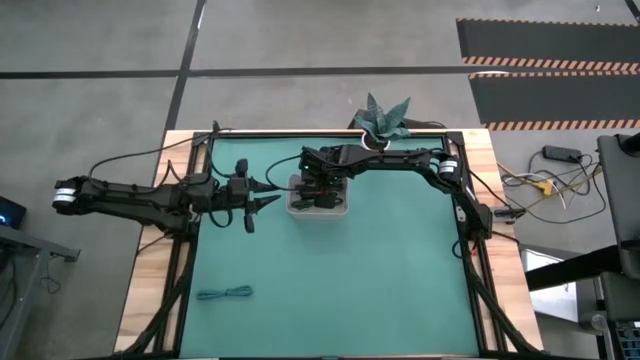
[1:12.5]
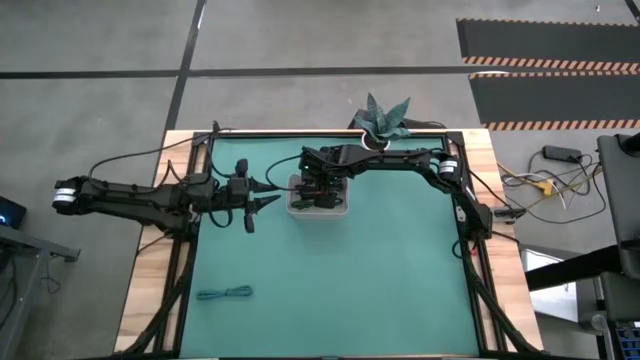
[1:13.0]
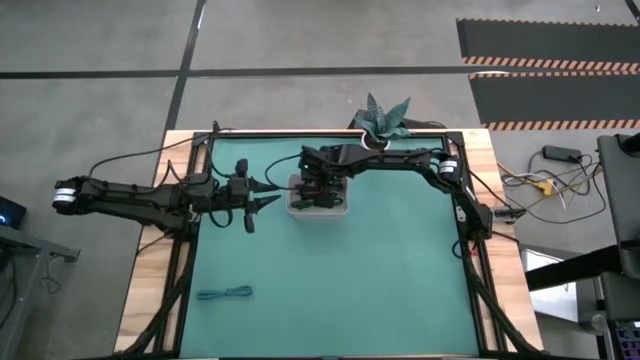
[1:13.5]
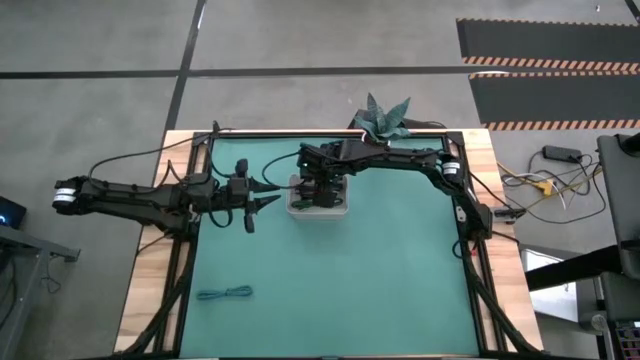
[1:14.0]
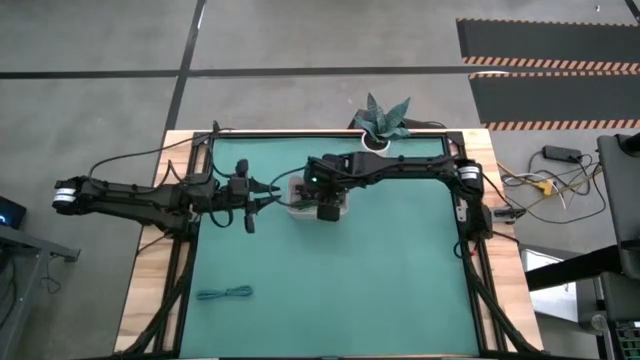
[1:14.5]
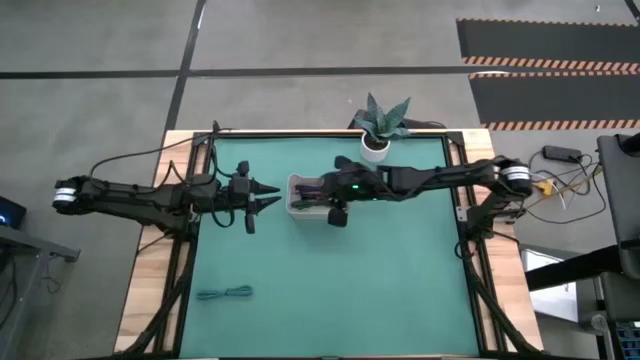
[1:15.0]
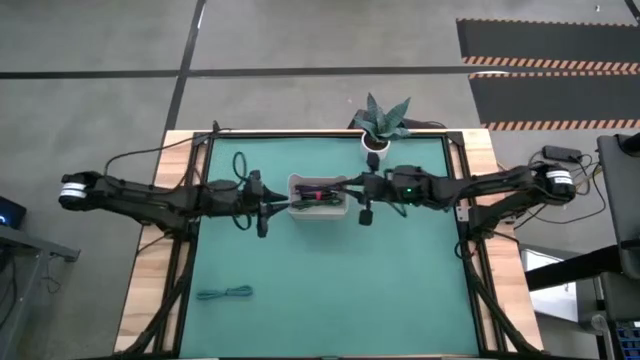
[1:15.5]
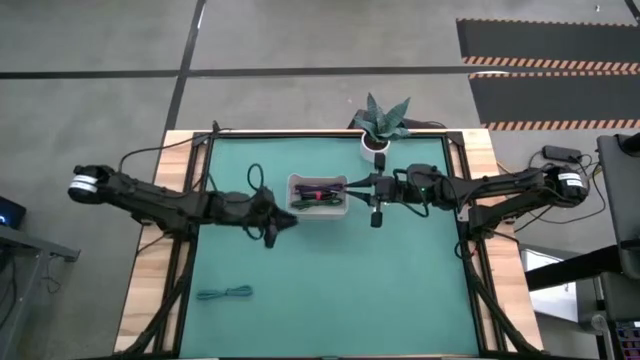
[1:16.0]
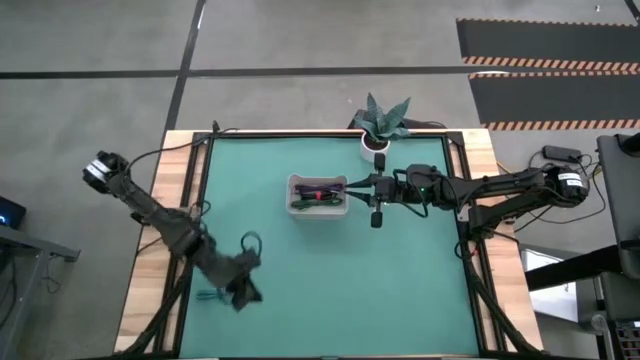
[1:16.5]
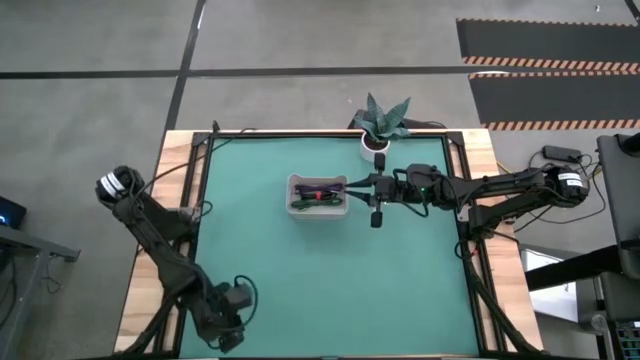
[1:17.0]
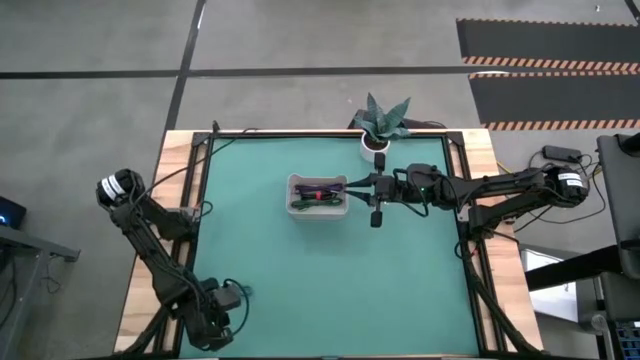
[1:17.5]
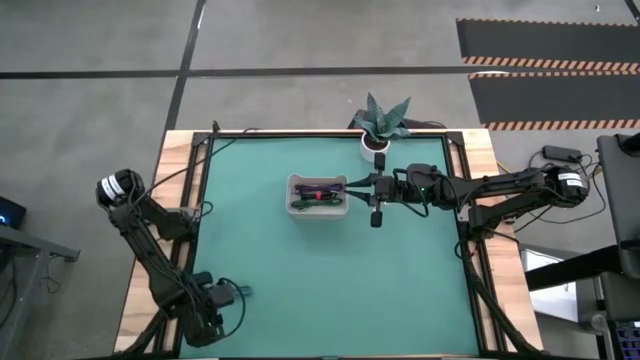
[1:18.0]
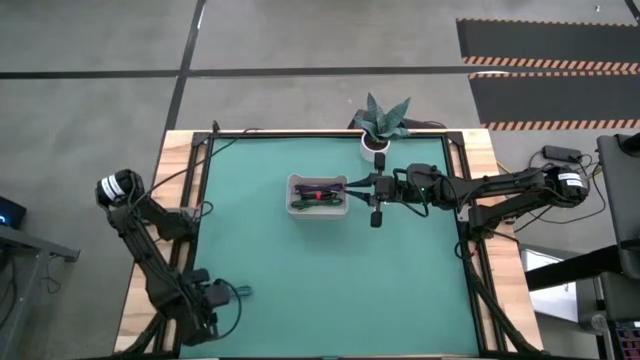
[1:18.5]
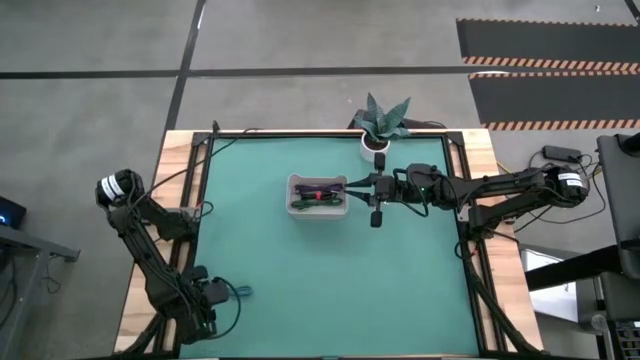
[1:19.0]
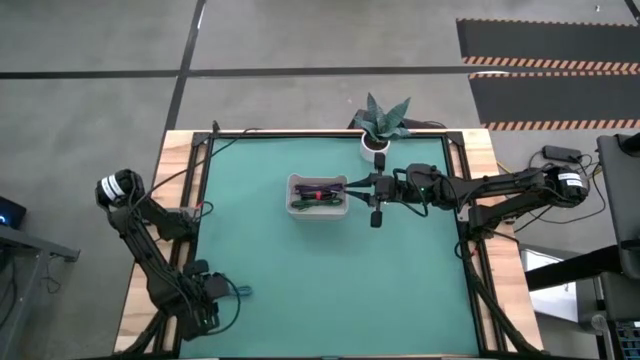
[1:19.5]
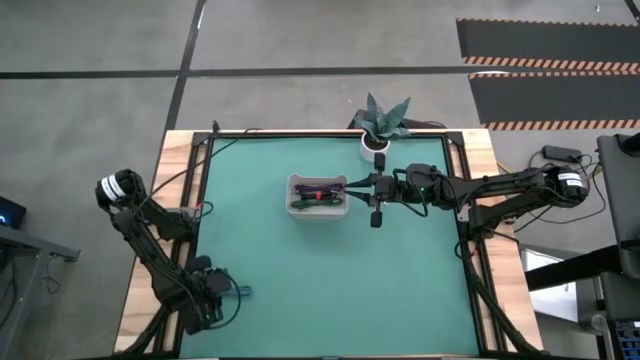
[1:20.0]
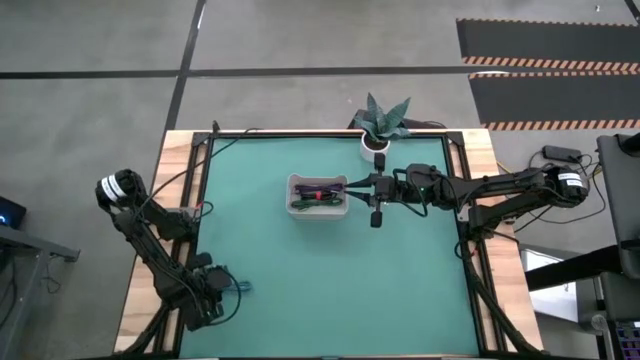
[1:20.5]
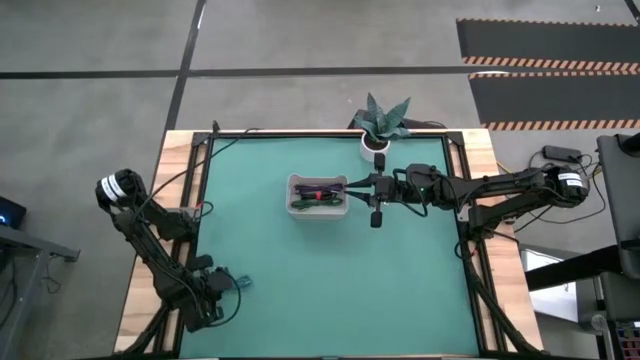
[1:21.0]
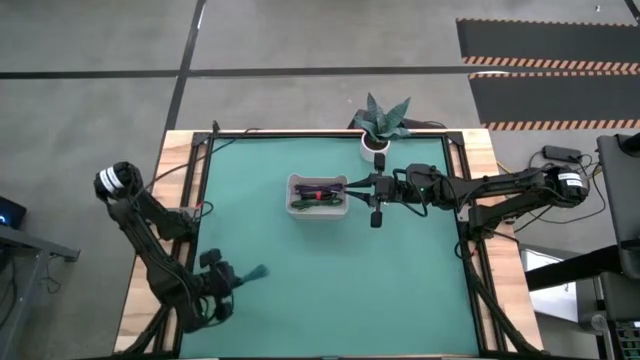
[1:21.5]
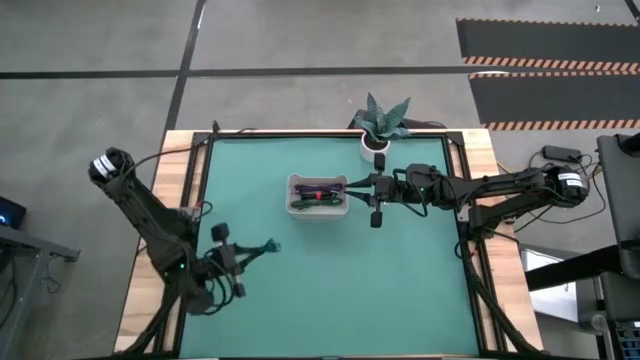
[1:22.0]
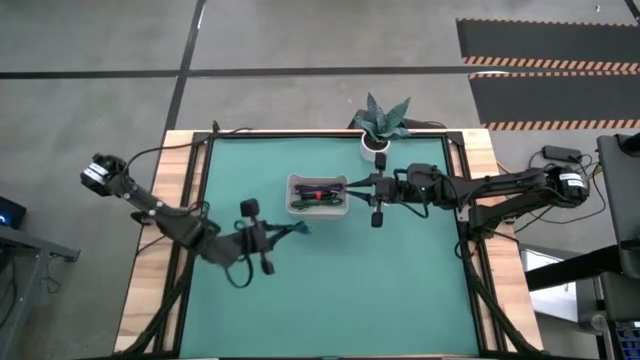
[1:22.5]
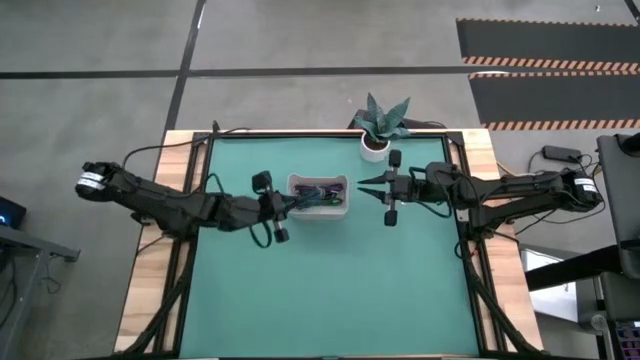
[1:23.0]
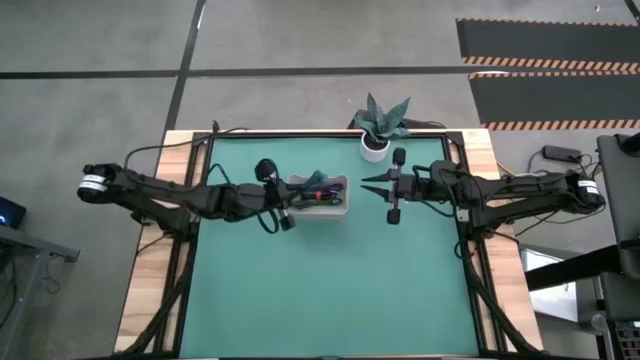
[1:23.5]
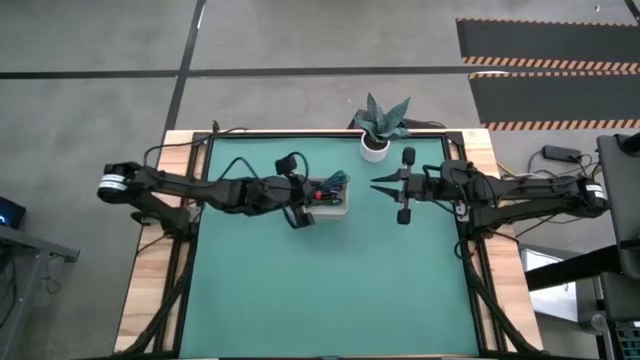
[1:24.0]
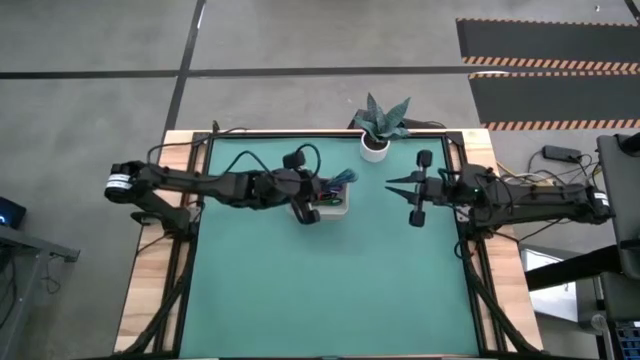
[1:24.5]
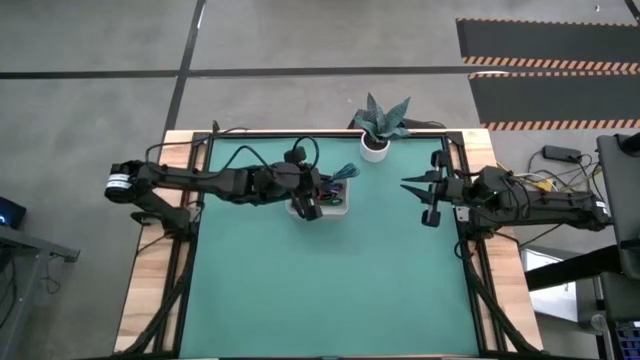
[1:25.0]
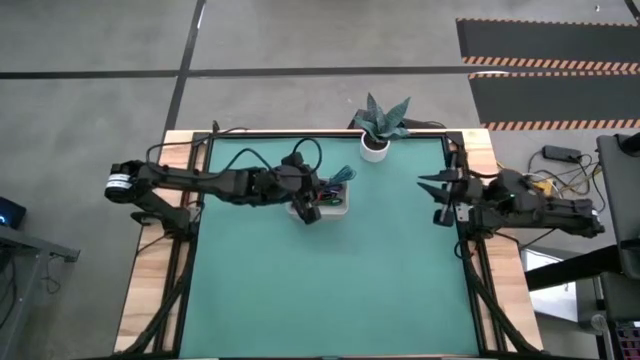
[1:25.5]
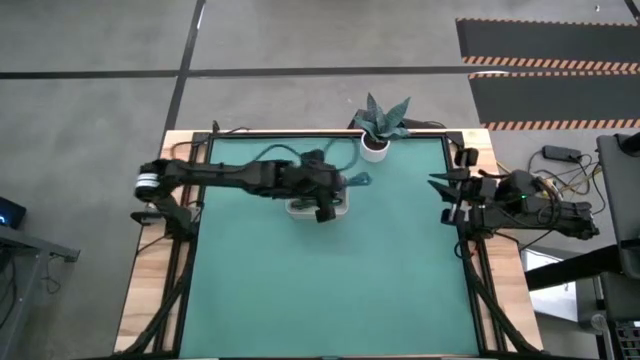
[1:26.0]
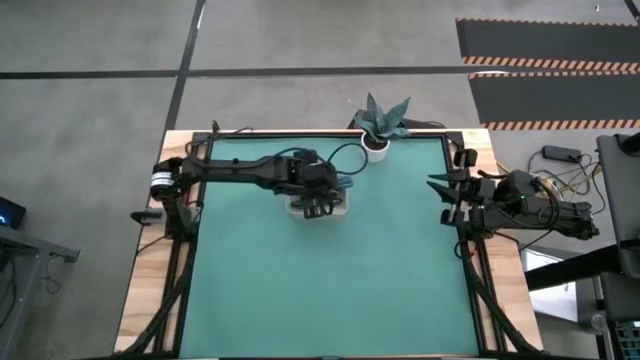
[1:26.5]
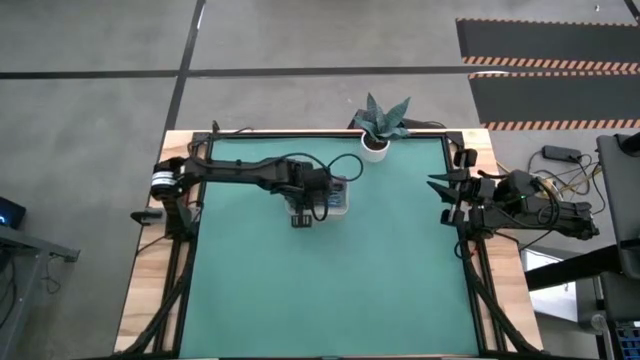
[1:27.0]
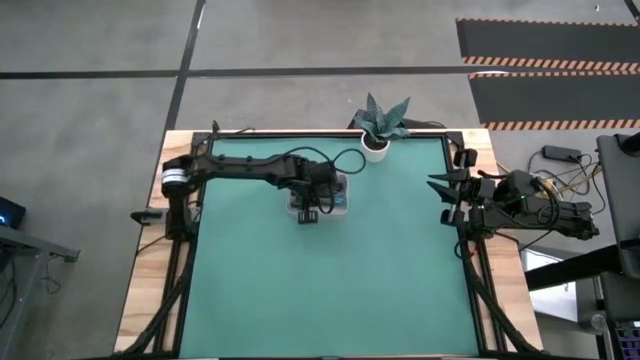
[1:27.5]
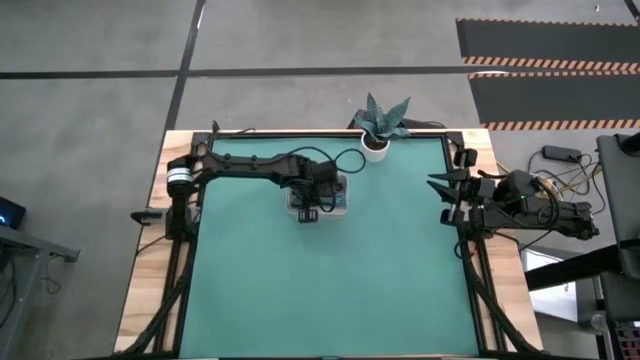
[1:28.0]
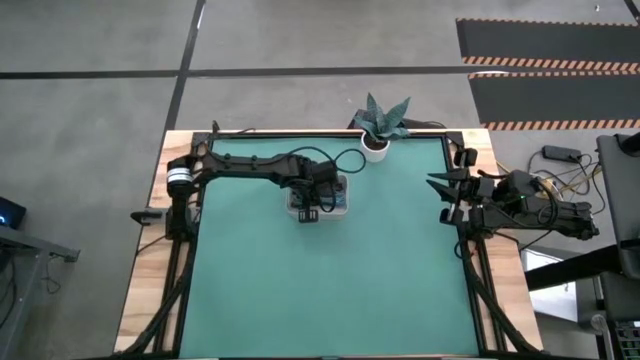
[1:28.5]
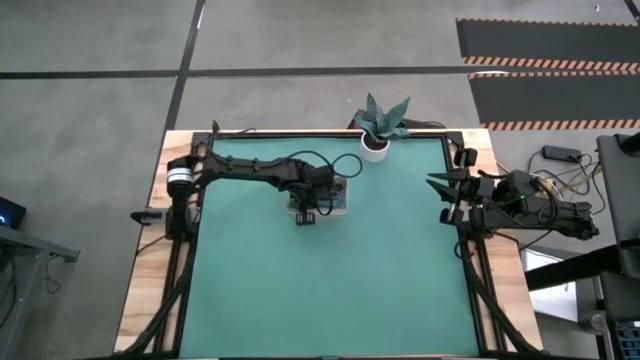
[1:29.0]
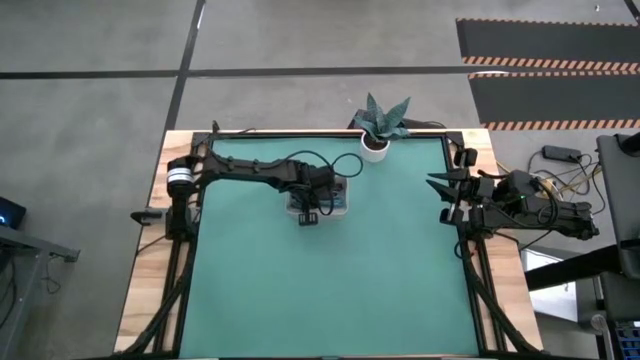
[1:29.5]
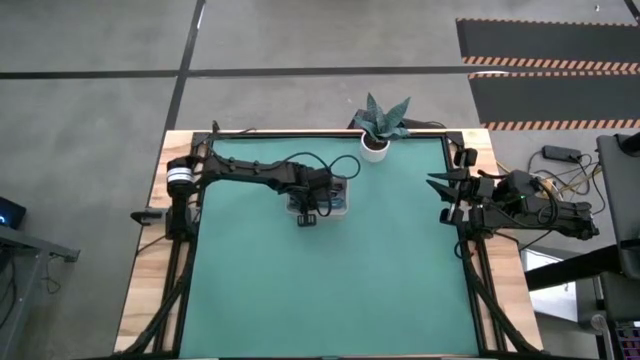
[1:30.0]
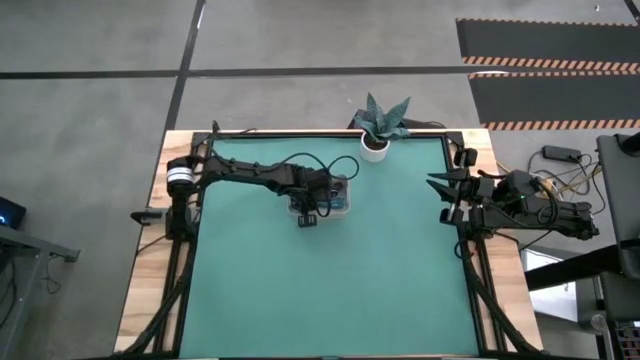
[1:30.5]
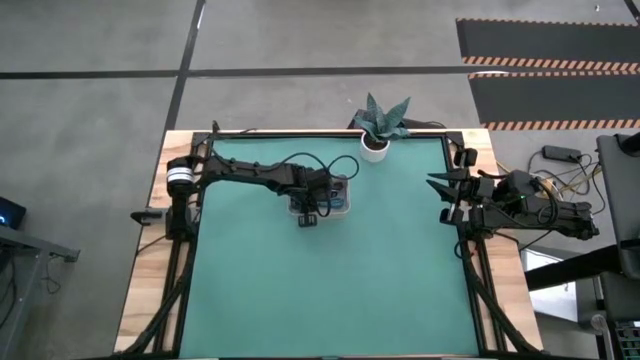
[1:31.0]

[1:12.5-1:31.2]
Task: Pick and place USB-C Cables
Put the blue charger cable into the white bin

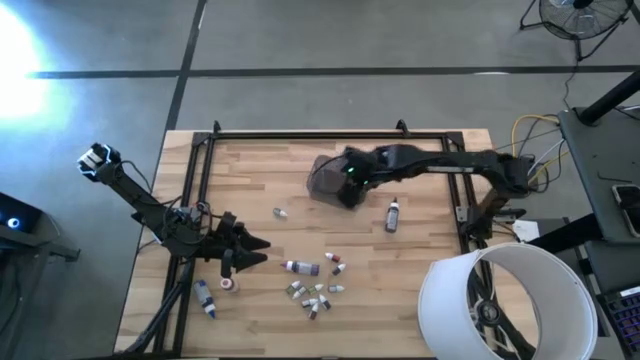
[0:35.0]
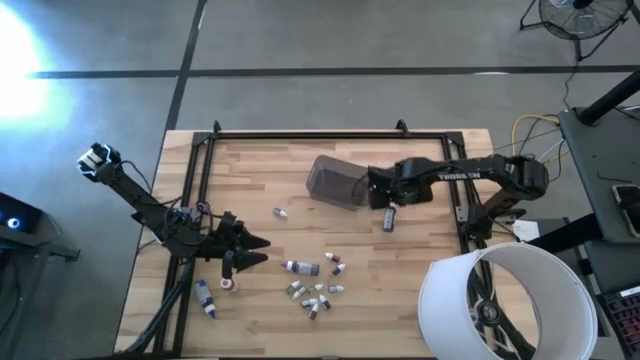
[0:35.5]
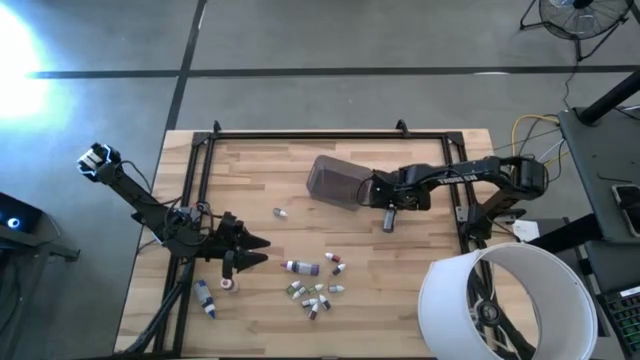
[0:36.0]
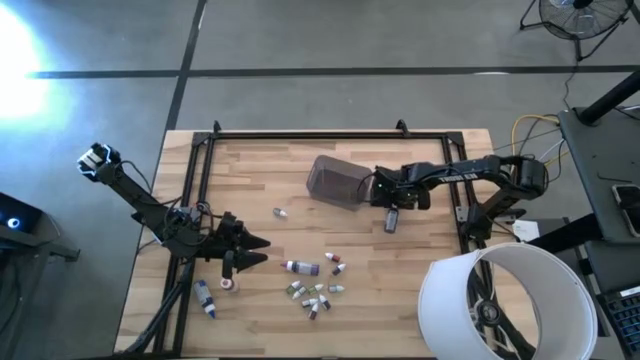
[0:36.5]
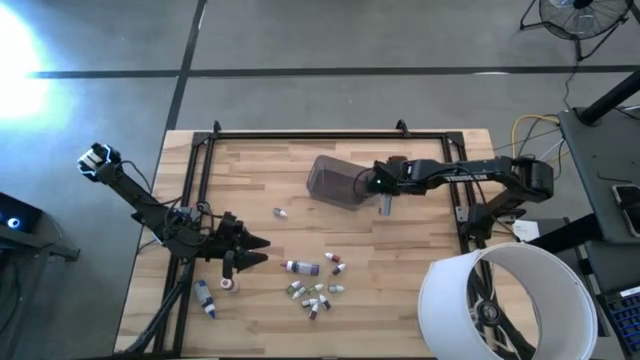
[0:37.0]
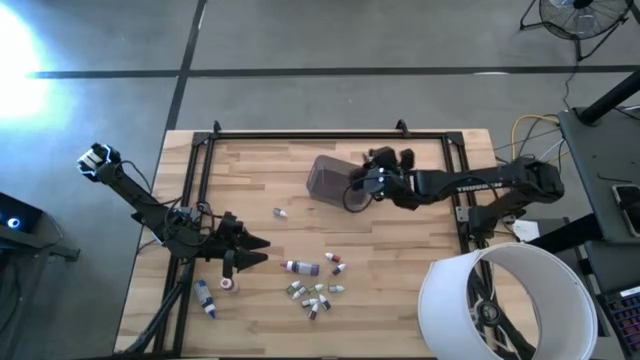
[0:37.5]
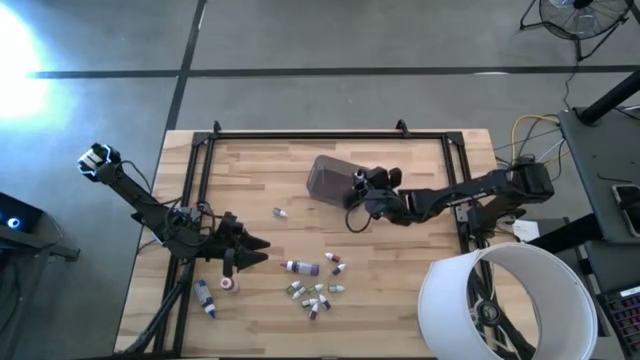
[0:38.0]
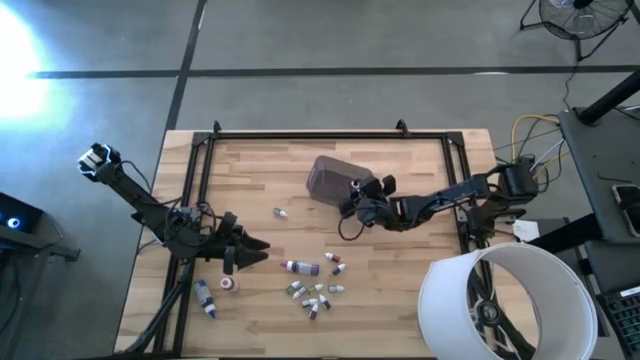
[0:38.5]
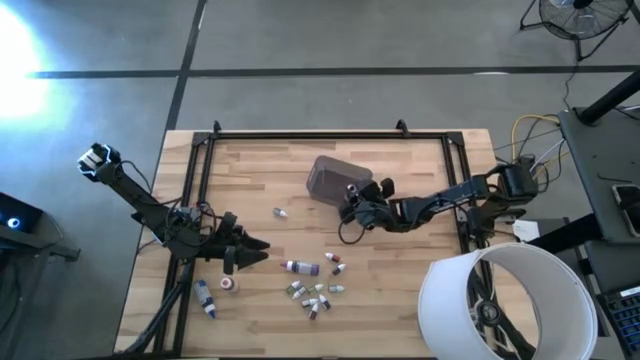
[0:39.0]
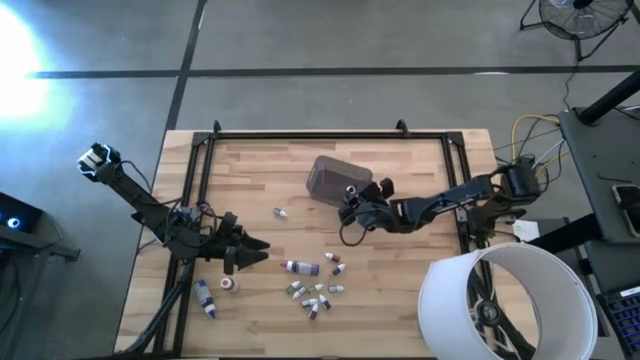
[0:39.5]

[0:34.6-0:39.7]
Task: Pick & Place food coloring
Put the large black food coloring bottle into the black bin
